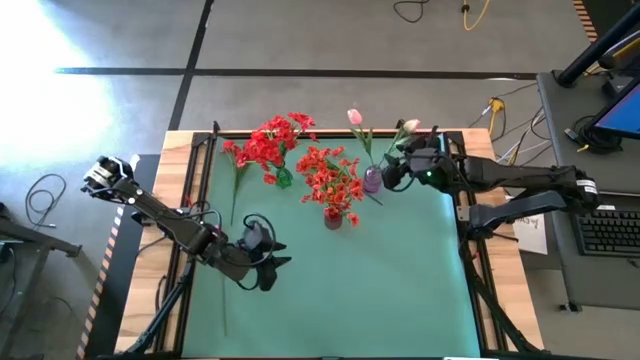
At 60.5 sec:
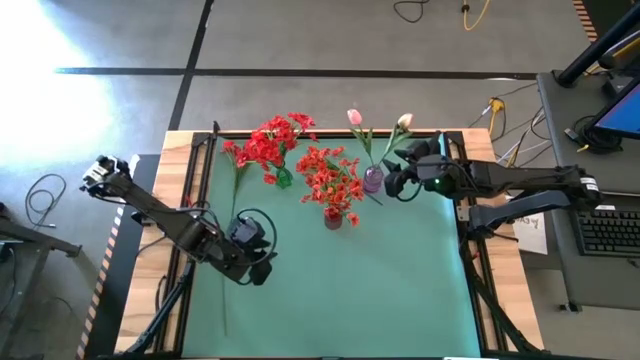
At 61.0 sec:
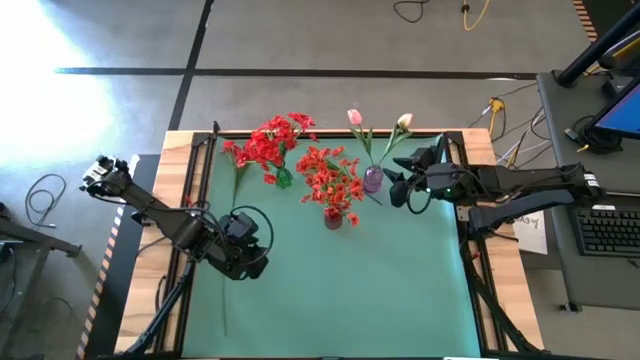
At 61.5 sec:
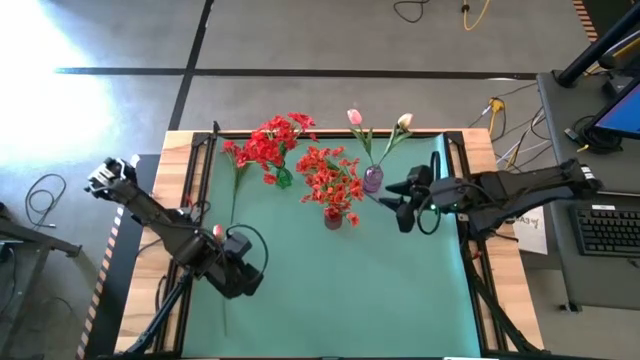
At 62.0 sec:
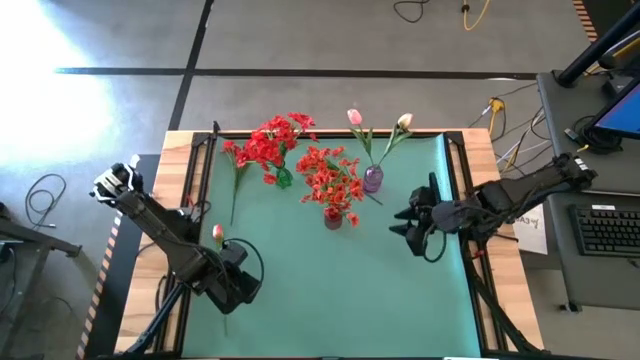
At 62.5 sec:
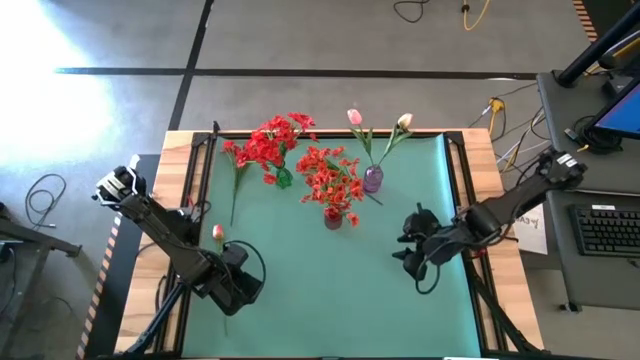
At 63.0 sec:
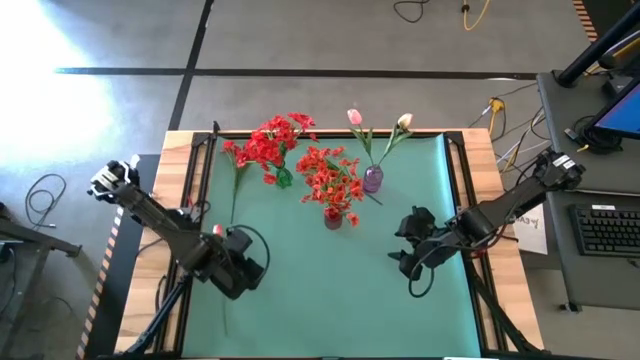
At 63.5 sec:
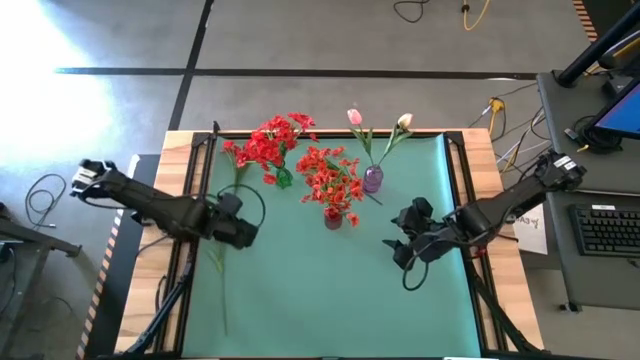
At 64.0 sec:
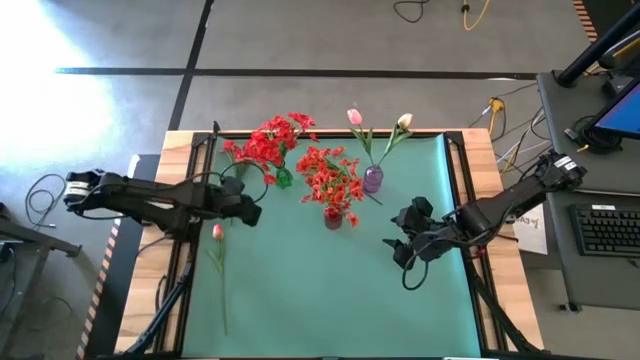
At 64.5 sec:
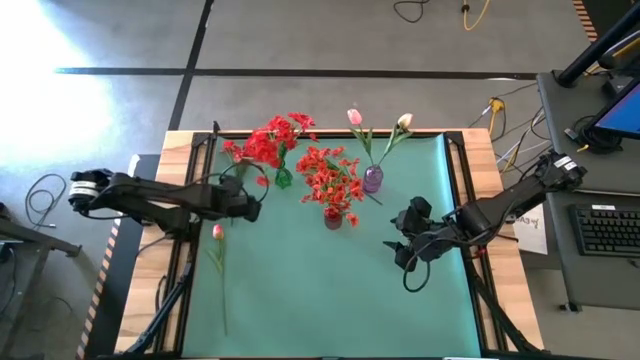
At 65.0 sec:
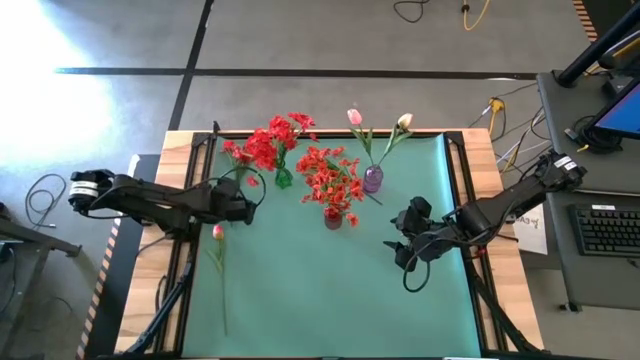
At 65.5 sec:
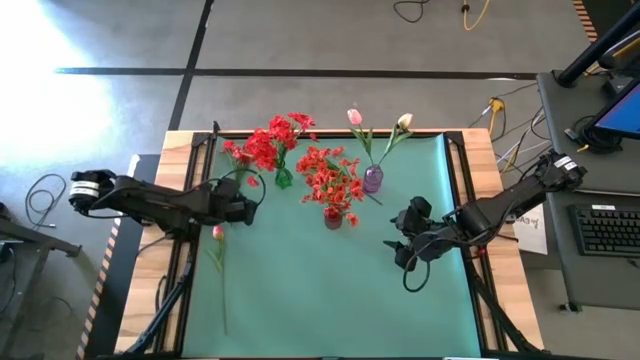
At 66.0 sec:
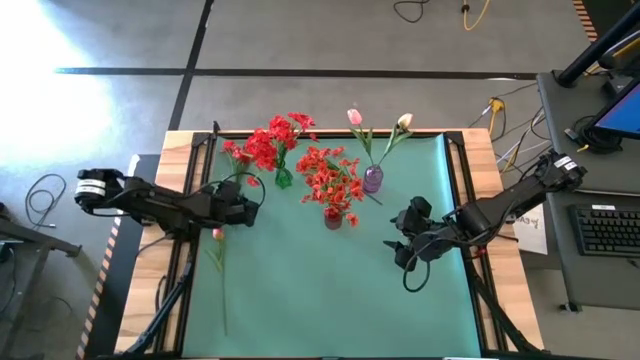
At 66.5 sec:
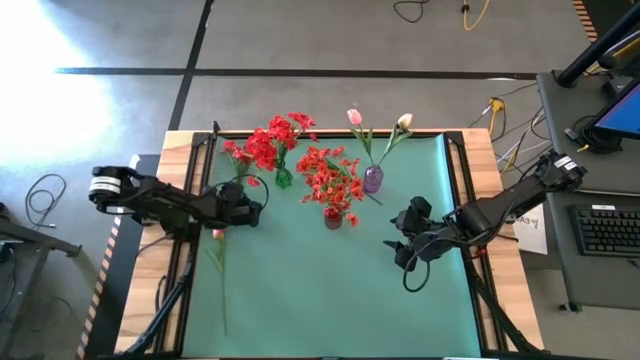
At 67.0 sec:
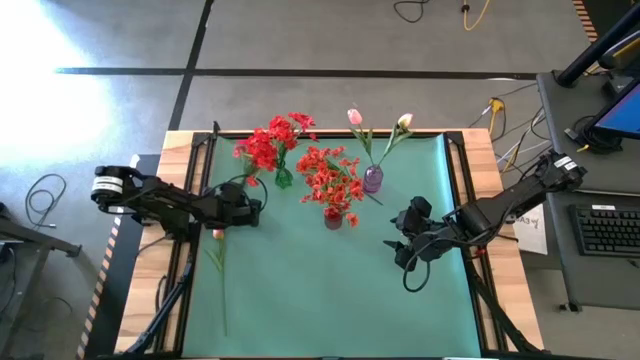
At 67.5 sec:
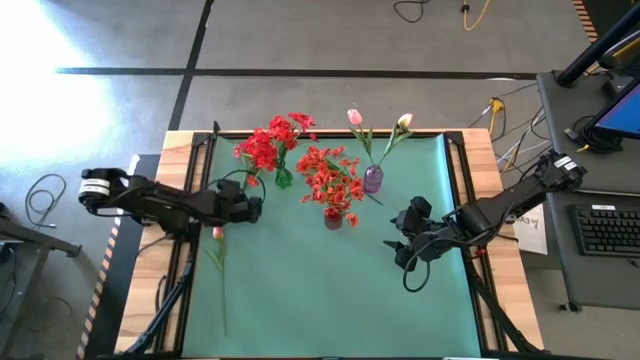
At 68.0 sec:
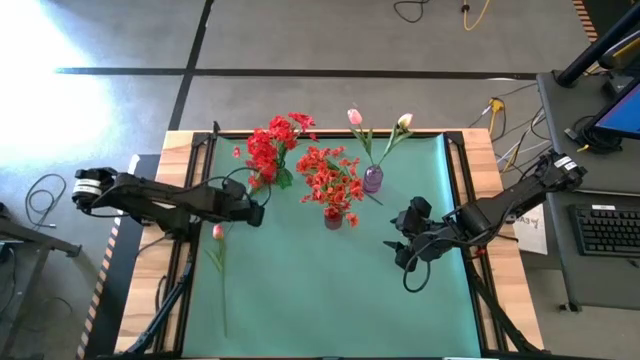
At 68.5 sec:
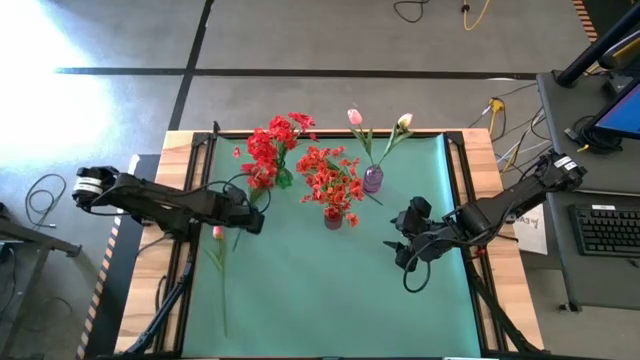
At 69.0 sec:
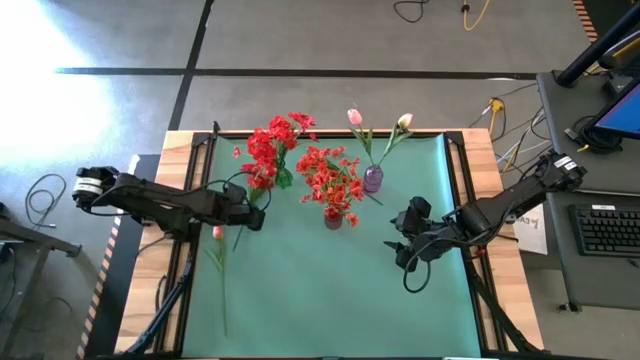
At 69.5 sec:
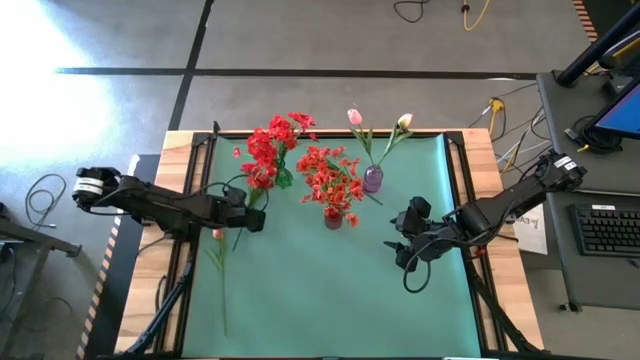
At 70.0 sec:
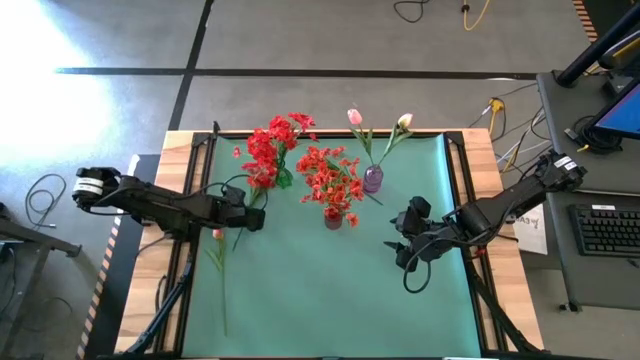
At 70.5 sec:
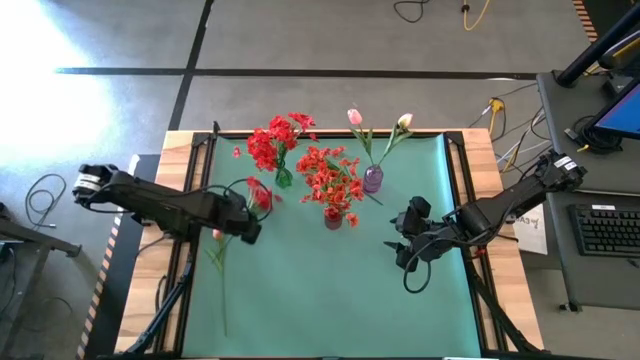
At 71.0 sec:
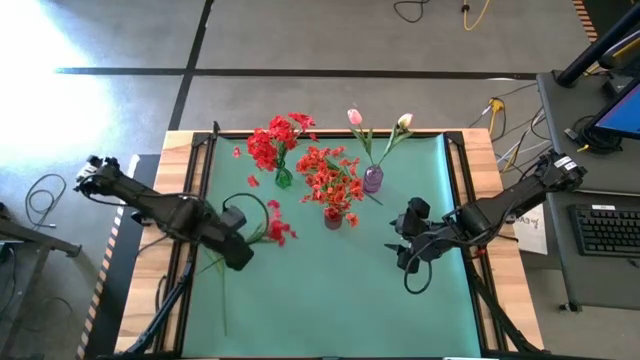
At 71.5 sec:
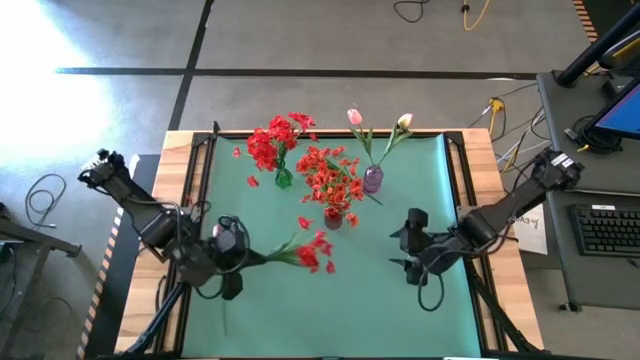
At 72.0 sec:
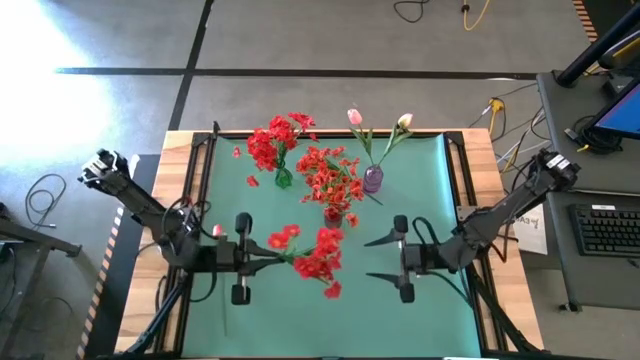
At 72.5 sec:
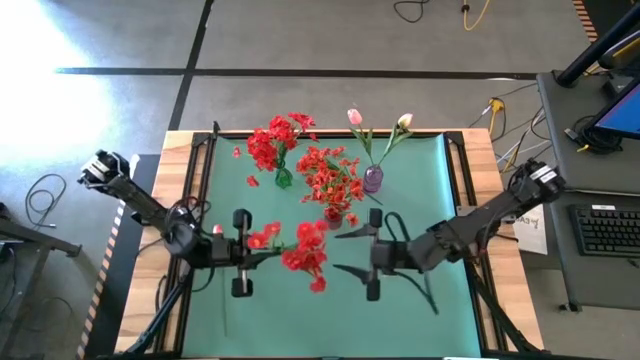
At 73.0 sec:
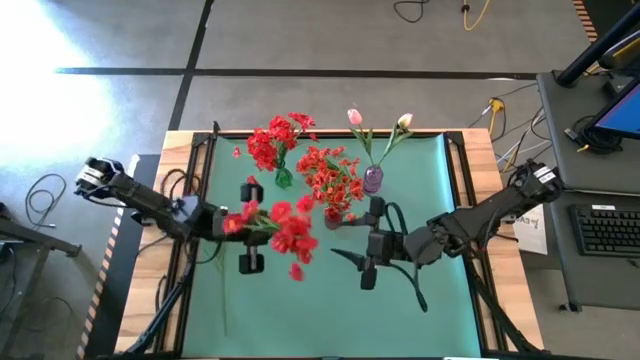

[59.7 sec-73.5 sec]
Task: Sort flowers into vase by color
Put the red flowers into the green vase

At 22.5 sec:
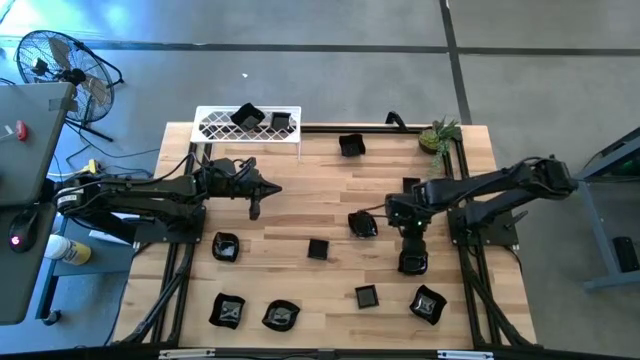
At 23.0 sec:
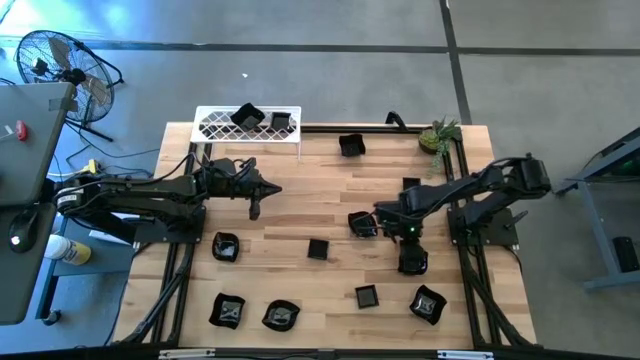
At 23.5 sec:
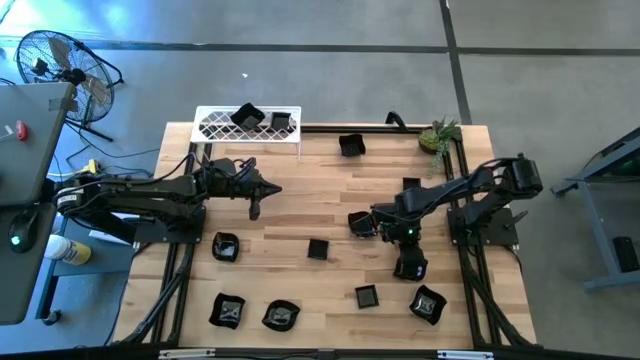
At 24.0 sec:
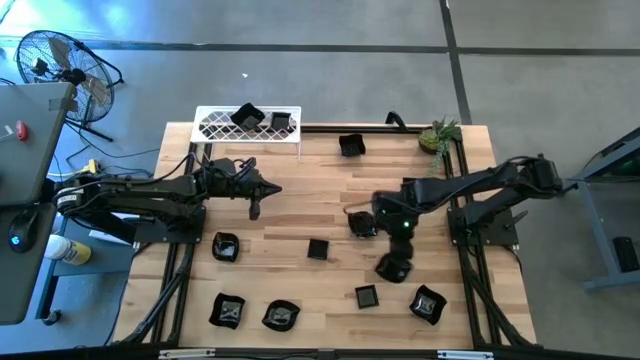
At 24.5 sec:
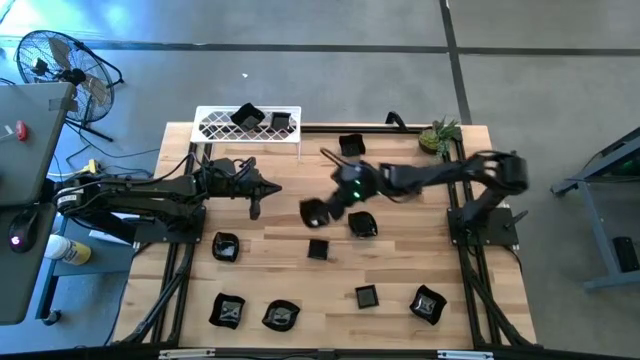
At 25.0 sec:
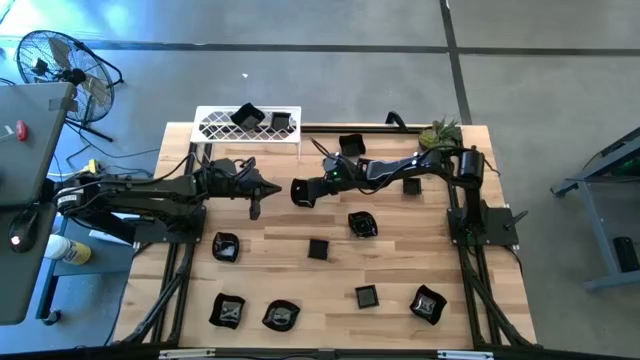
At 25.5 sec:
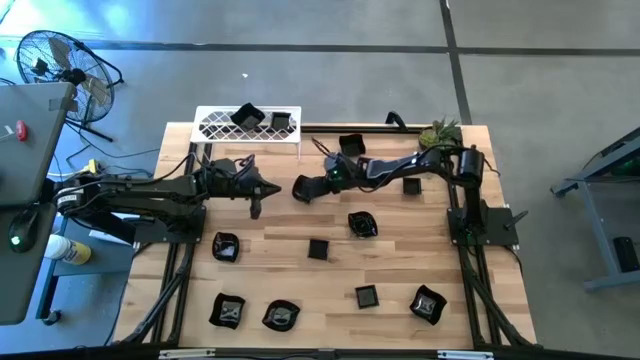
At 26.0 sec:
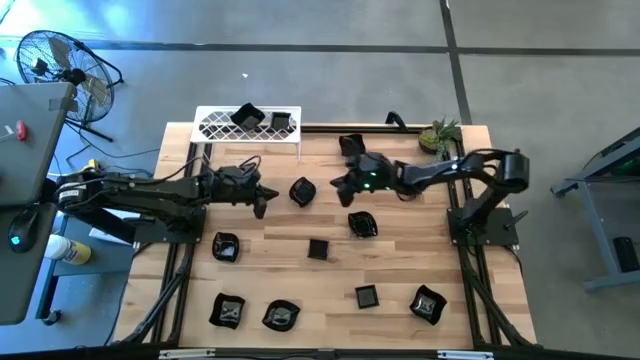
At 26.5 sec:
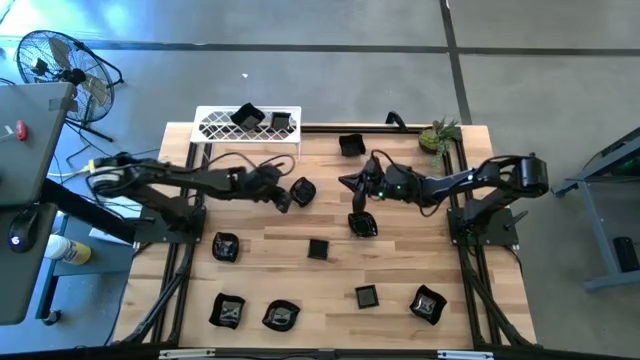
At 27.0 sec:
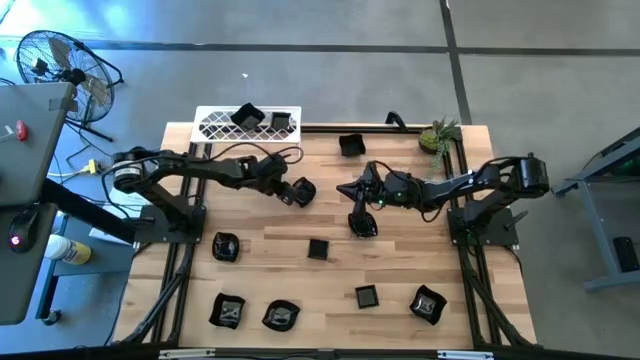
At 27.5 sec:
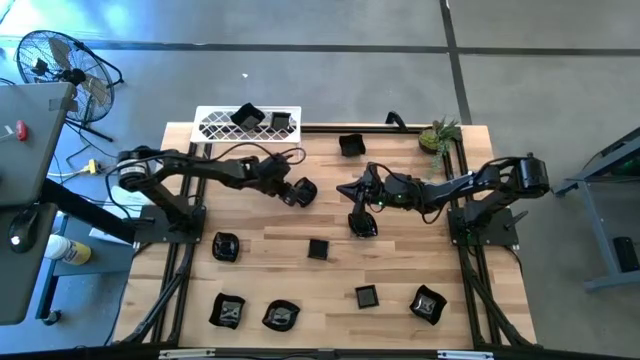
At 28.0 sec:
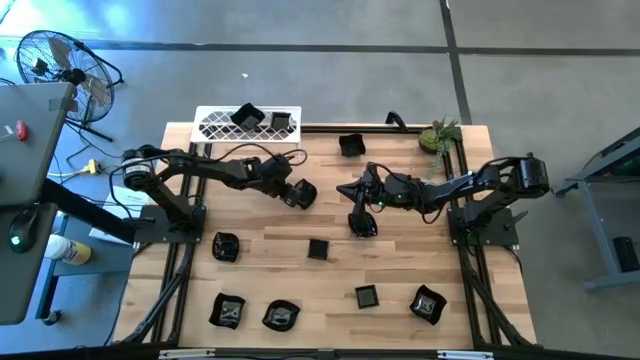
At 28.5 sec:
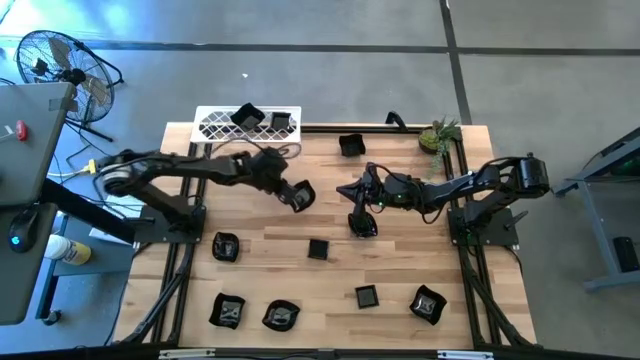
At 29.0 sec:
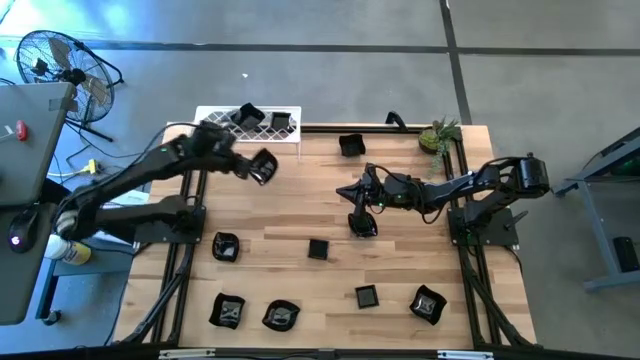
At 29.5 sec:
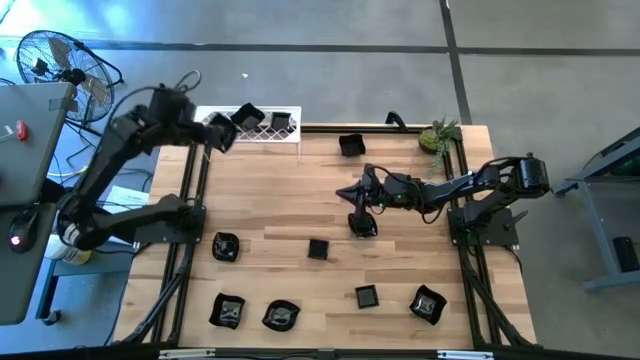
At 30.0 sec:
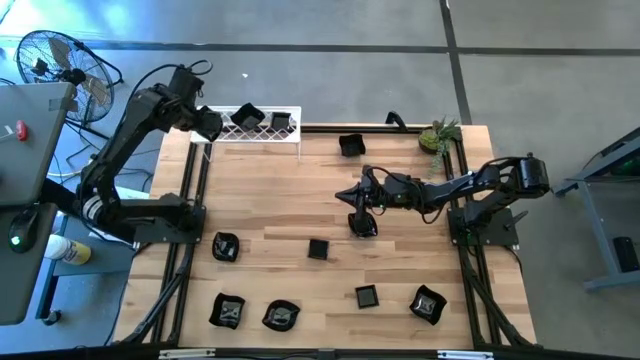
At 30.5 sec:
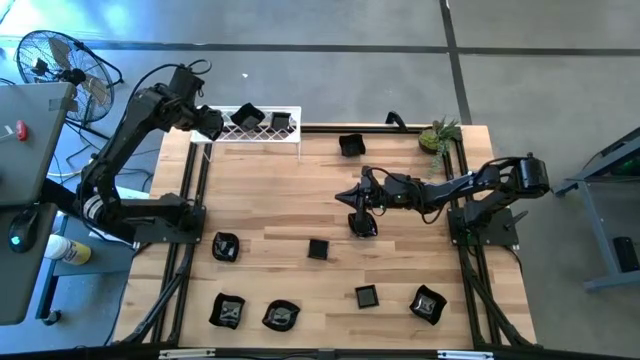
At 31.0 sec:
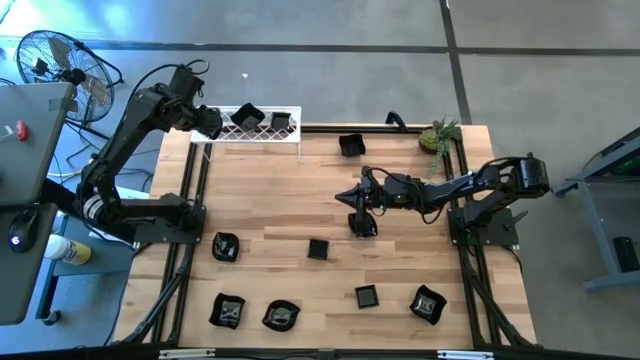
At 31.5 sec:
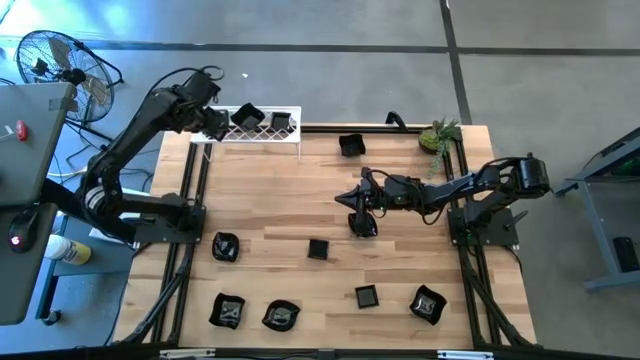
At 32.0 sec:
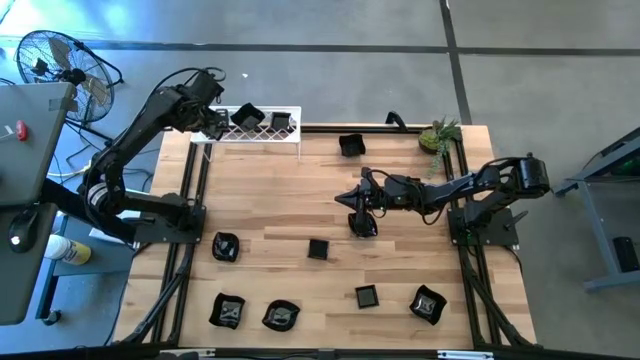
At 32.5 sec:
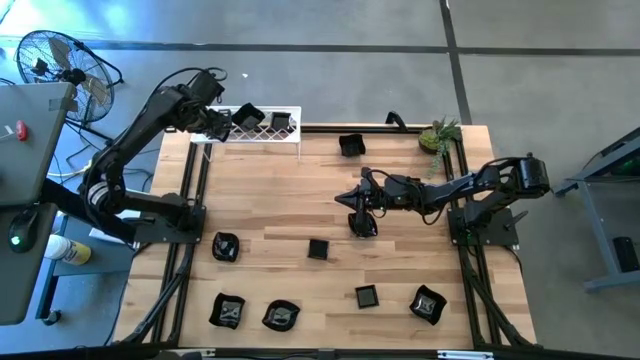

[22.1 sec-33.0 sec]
Task: Pick & Place Mini shaped plates
Put the black leaf-shaped plate on the shelf
